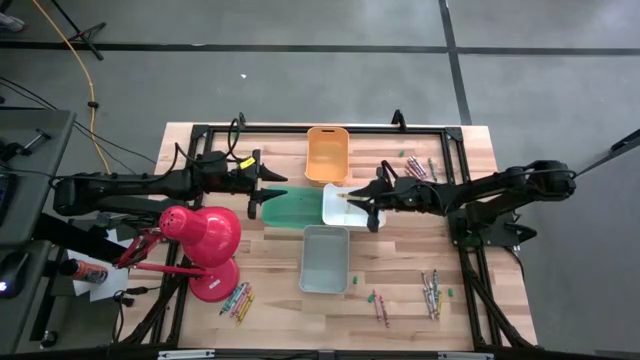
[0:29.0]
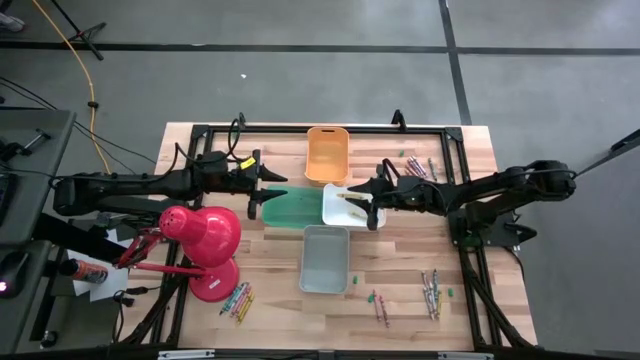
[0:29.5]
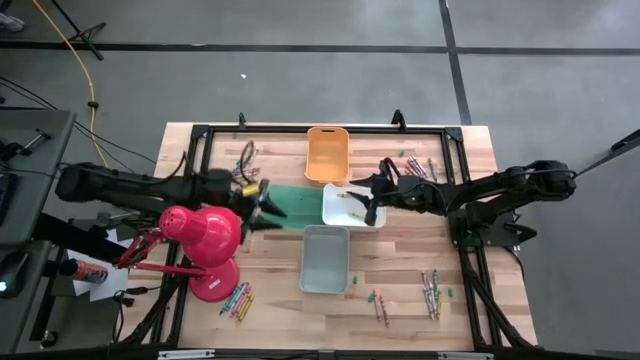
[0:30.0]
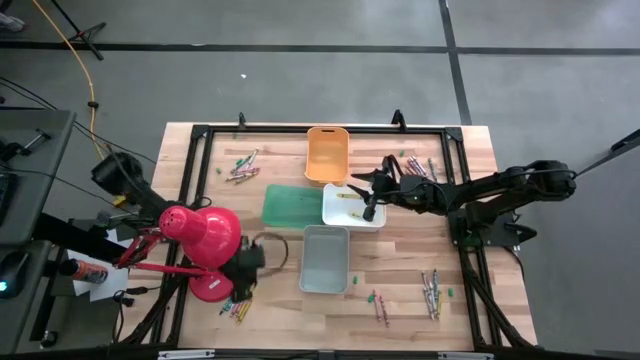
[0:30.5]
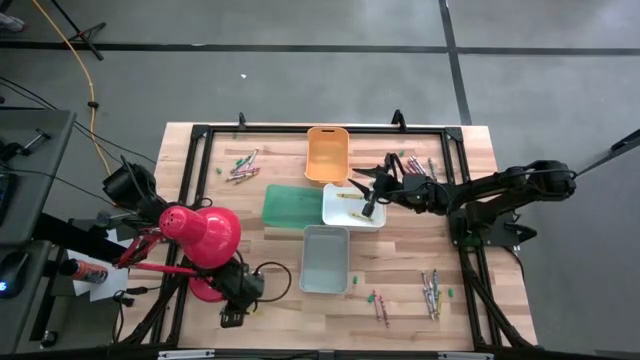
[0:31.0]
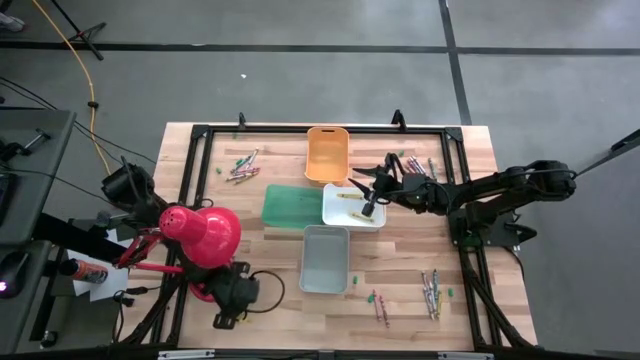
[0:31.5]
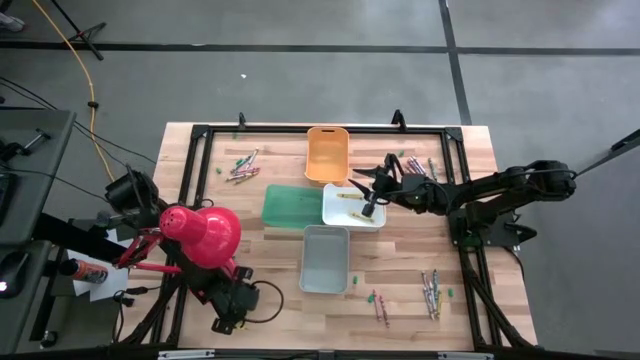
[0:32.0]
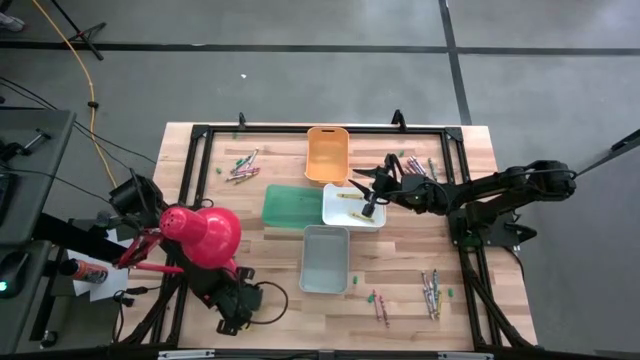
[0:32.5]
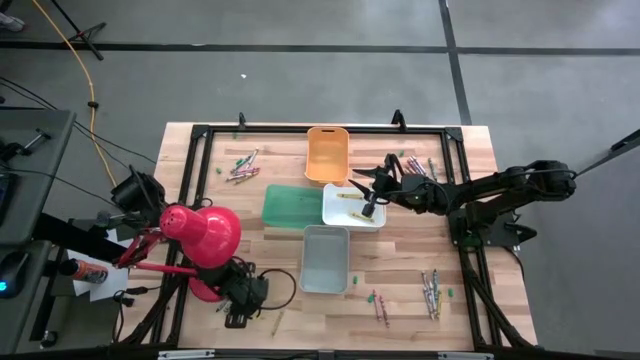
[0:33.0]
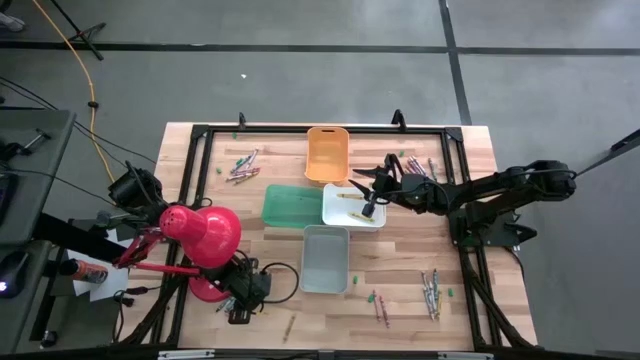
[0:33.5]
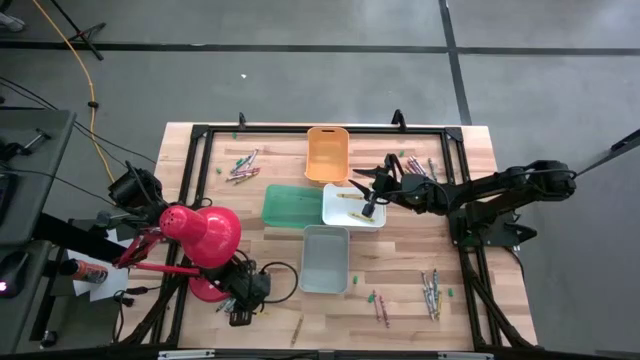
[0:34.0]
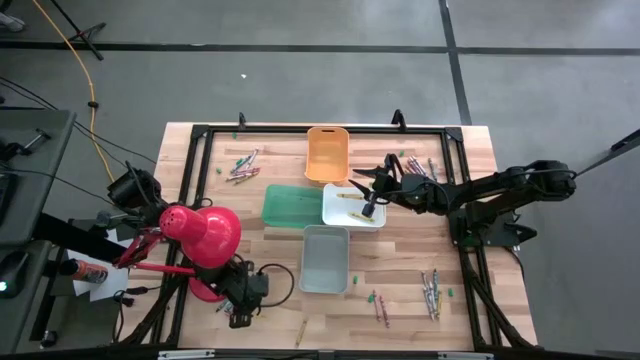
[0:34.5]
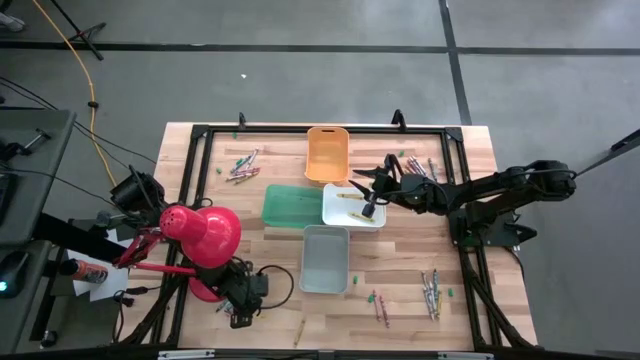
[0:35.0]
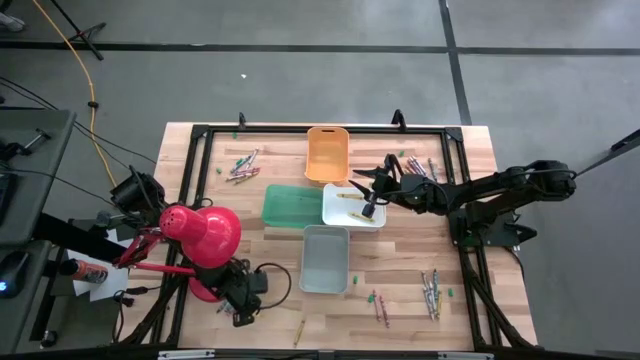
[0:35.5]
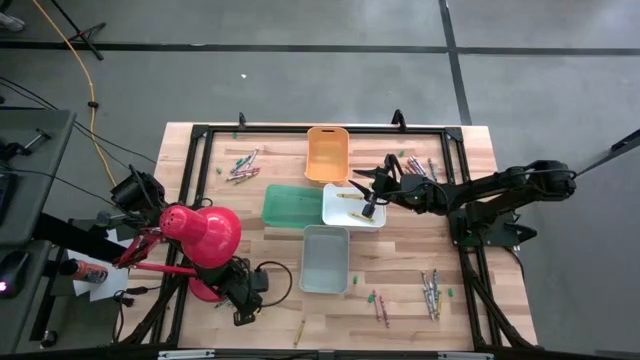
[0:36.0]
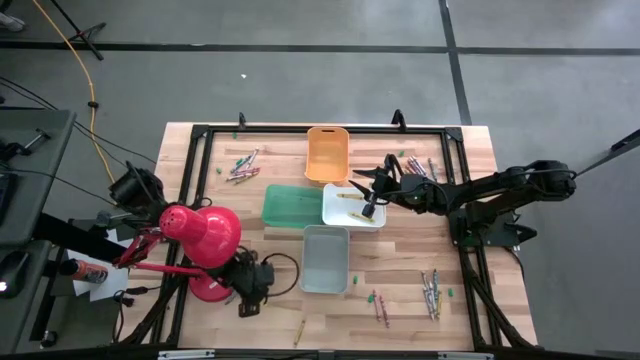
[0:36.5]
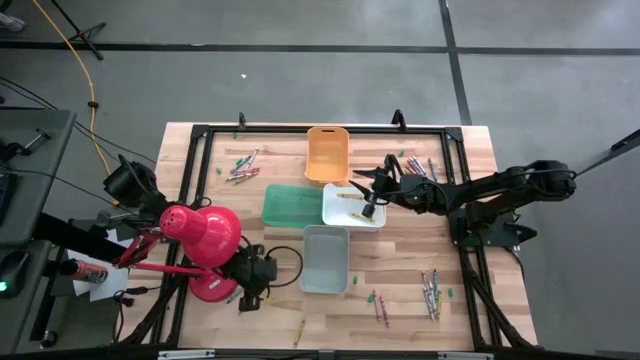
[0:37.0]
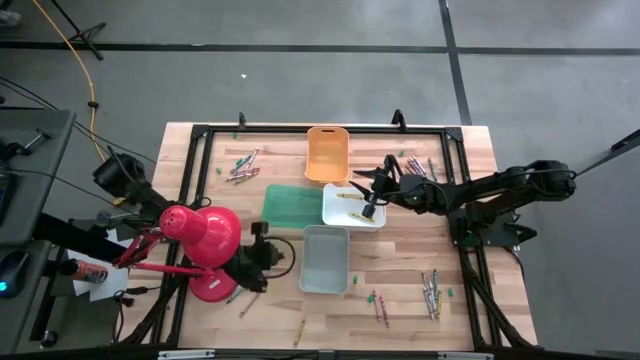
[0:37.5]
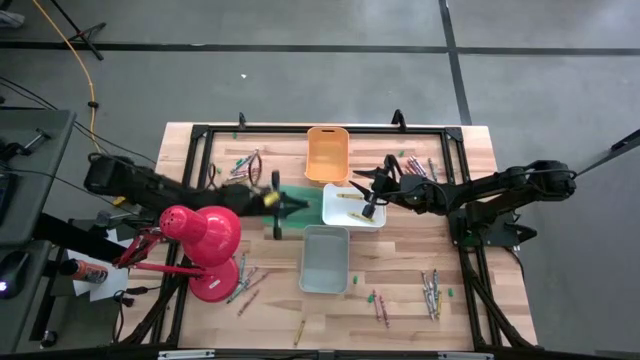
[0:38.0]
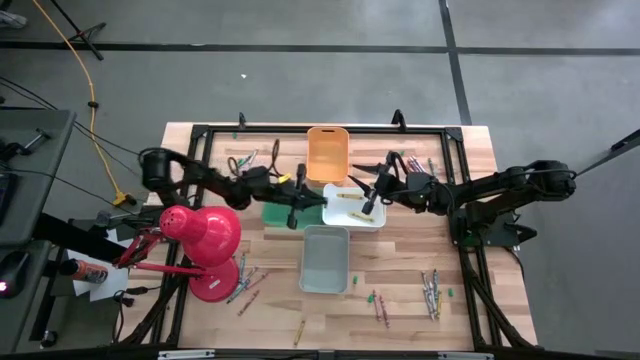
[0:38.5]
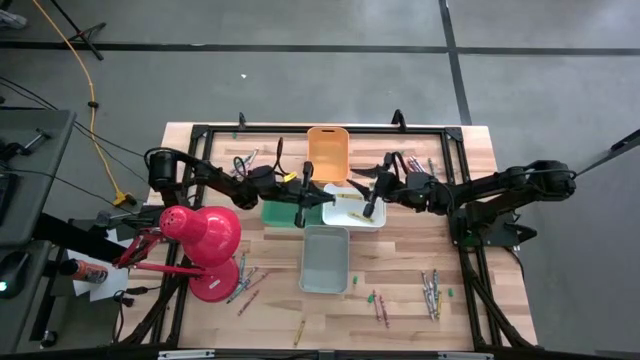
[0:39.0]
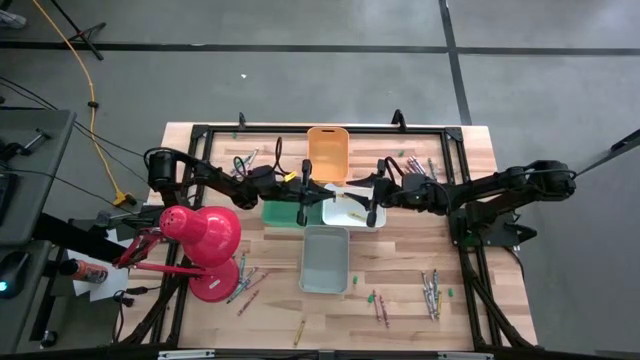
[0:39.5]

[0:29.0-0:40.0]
Task: Sort crayons
Put the yellow crayon into the white bin

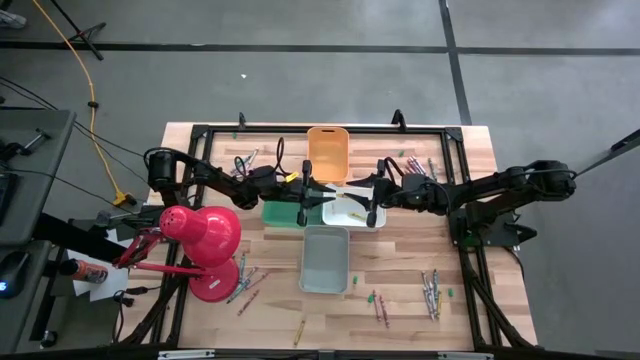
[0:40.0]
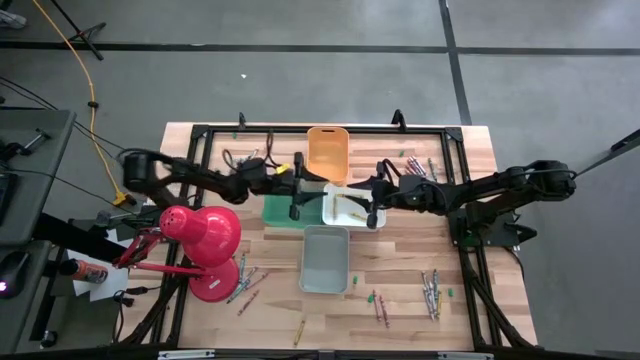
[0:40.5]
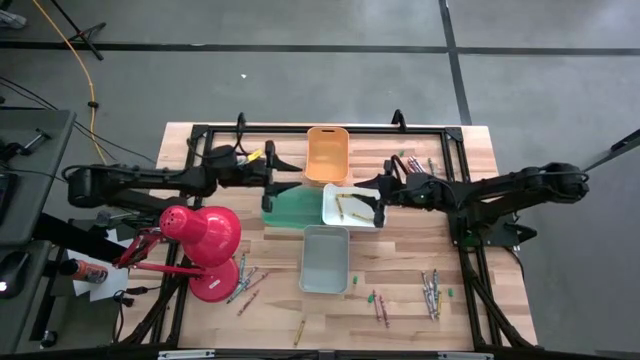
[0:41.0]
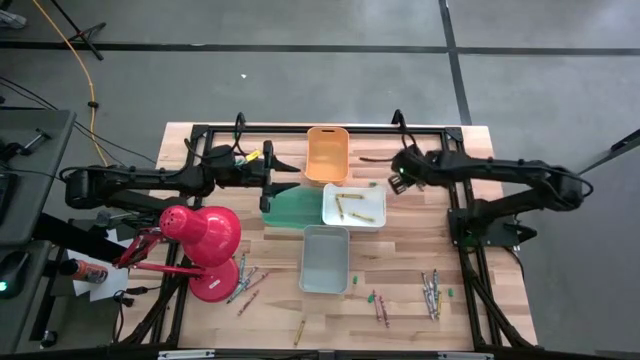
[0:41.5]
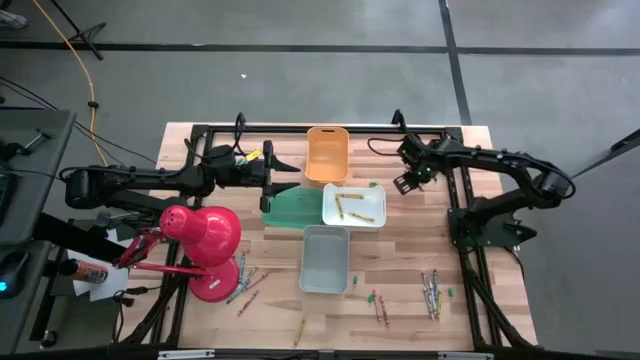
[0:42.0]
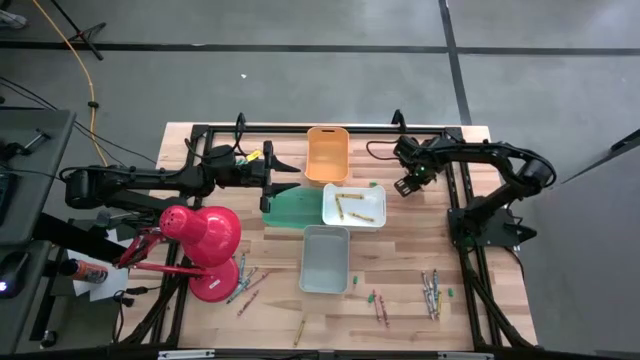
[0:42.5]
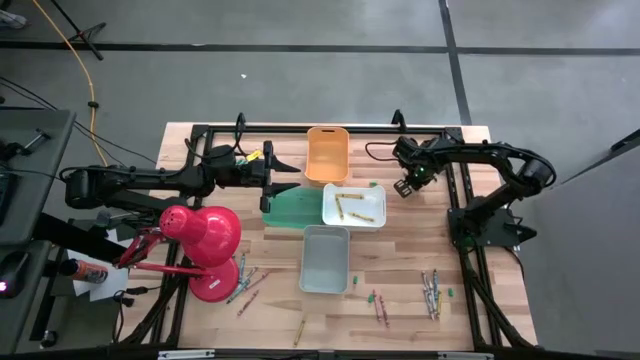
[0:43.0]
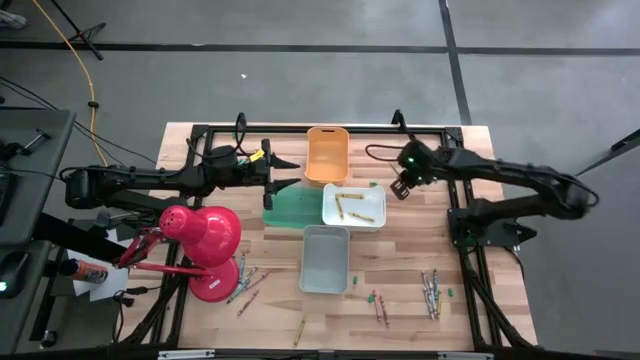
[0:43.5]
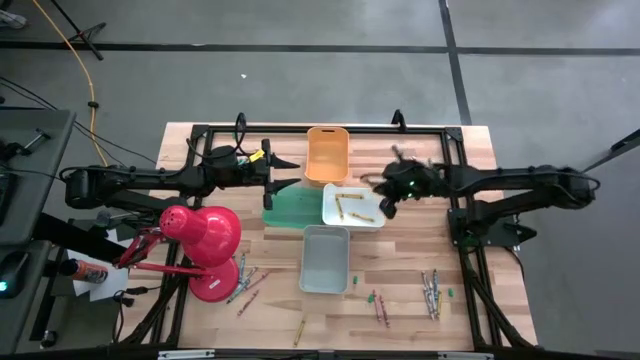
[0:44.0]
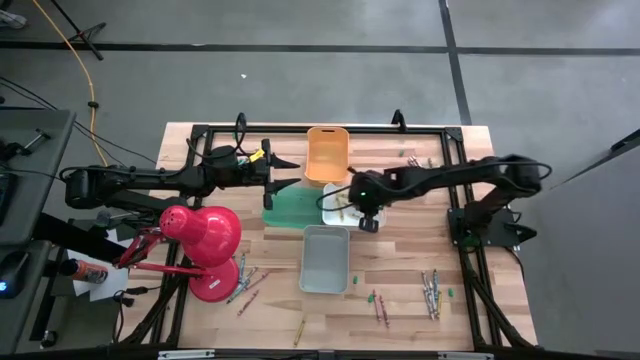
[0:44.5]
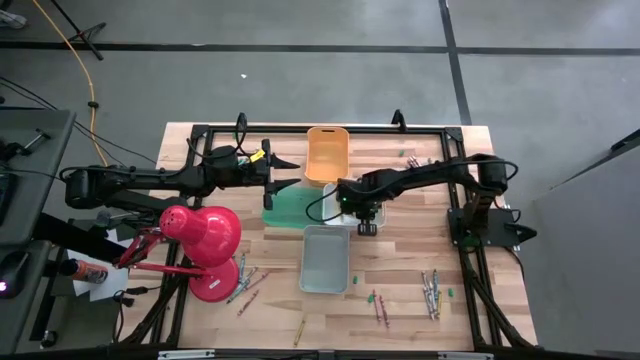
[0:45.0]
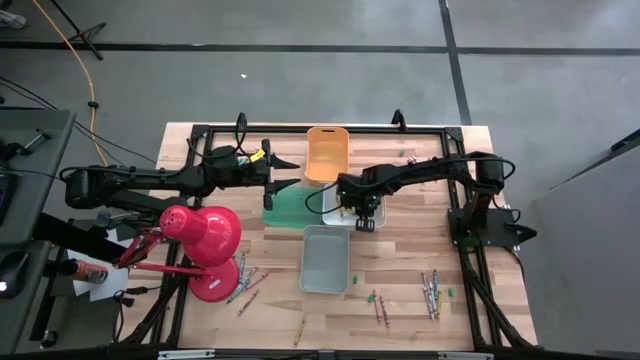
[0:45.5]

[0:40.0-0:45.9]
Put the yellow crayon into the white bin

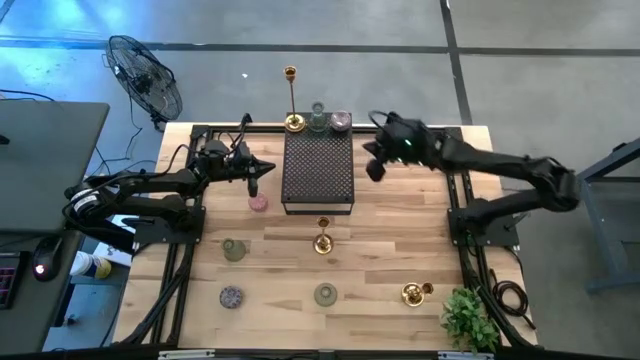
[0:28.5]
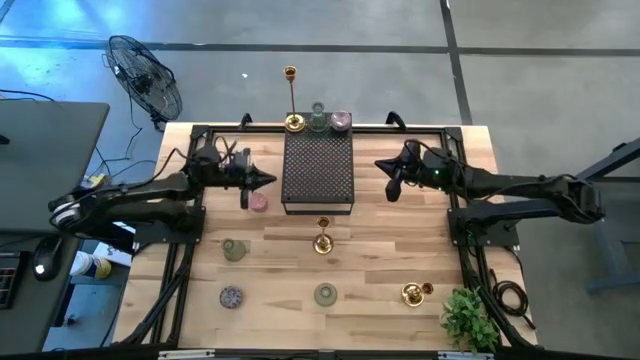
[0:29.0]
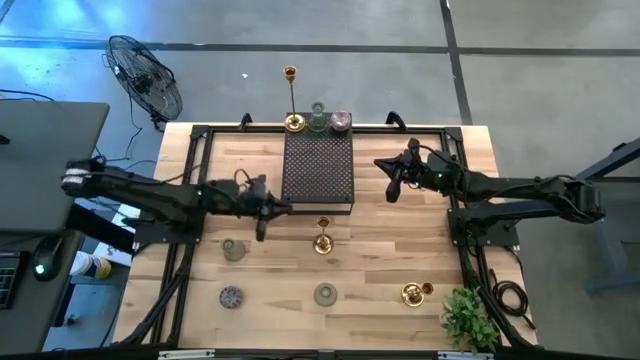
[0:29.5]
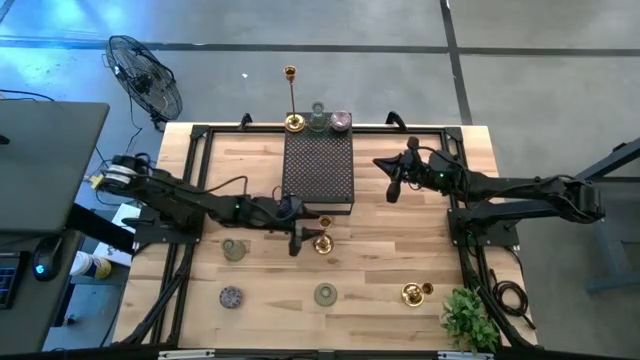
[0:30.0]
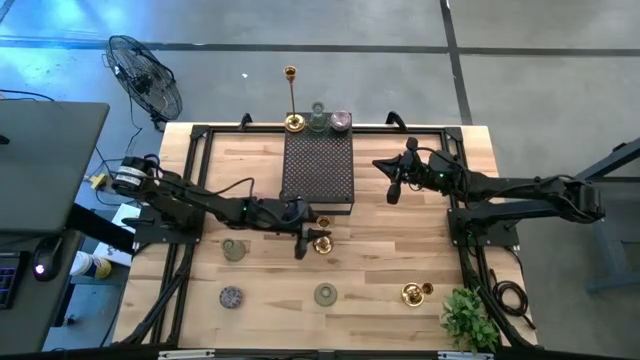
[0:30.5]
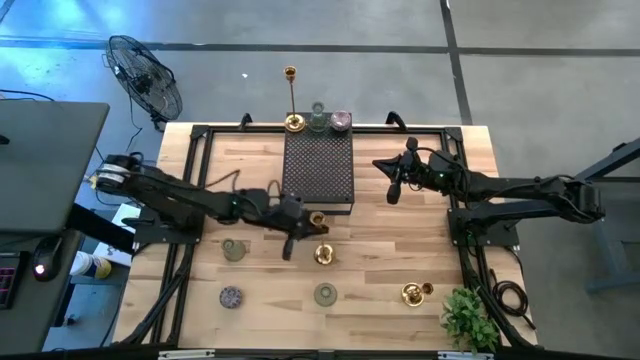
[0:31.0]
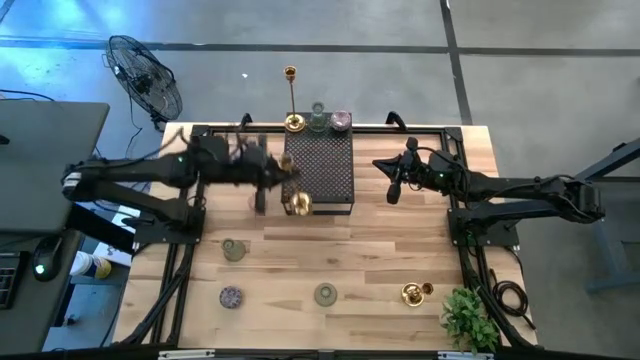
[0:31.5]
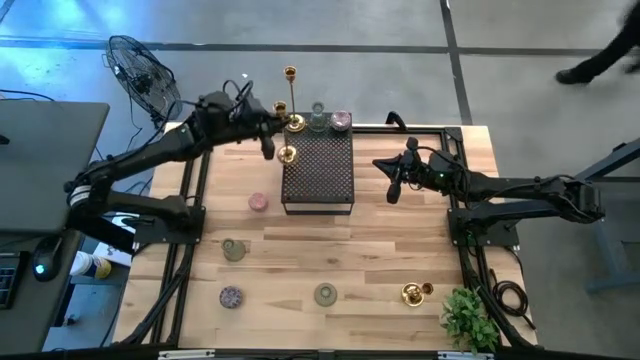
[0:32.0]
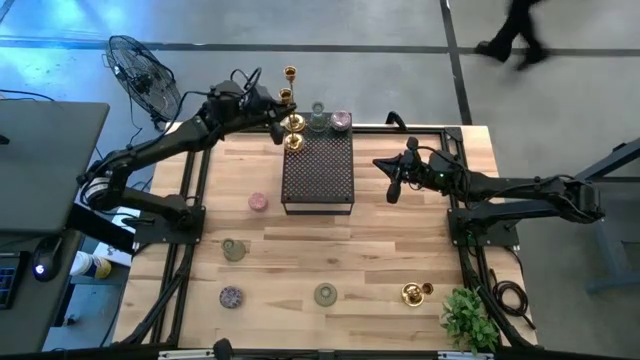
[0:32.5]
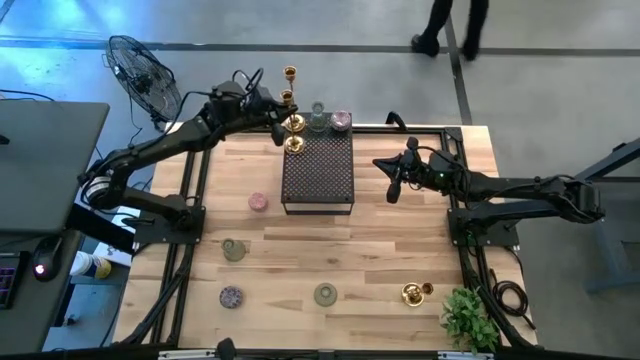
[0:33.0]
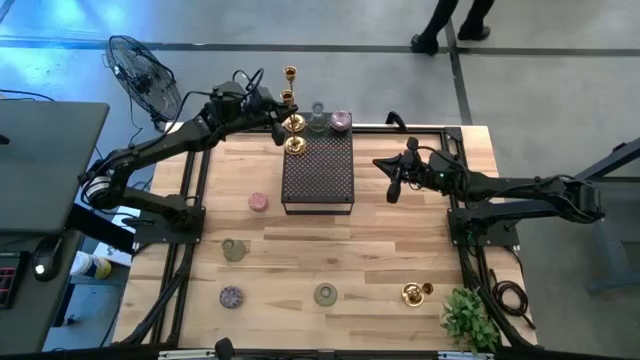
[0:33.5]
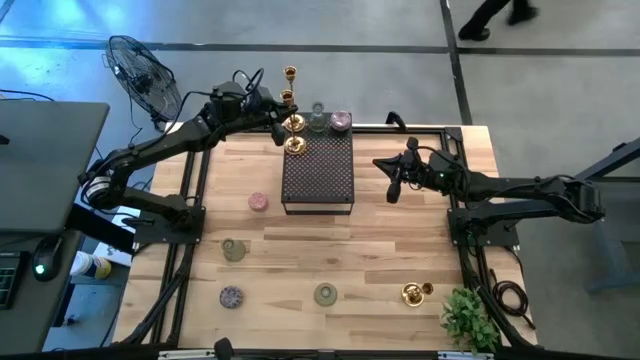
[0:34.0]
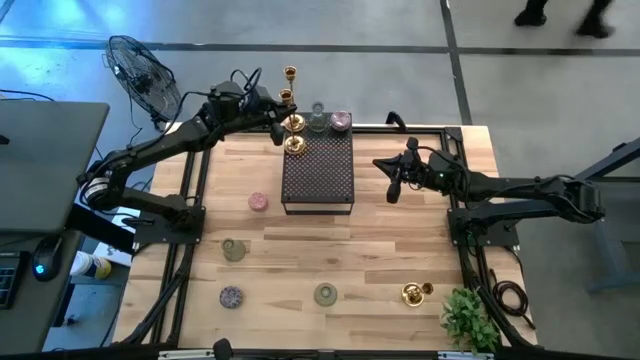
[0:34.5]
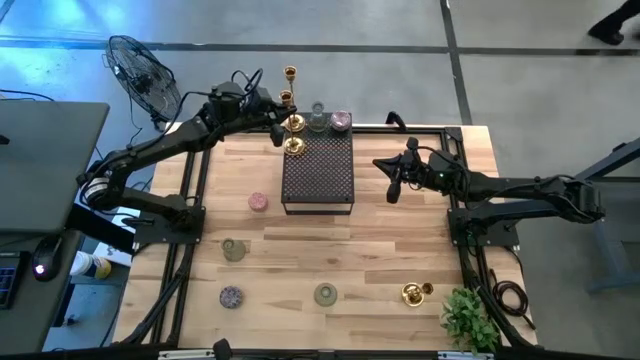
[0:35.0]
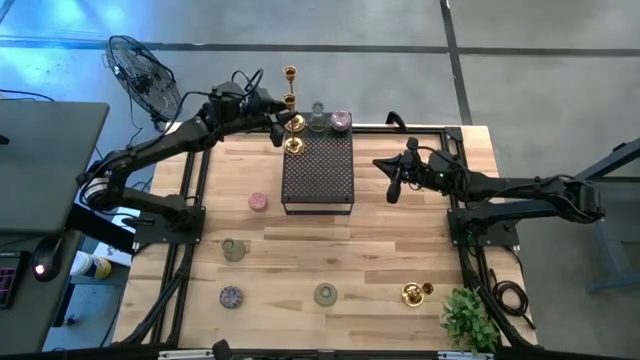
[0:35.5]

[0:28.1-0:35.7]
Task: Pick & Place candle stick holders
Put the top gold candle holder on the shelf
